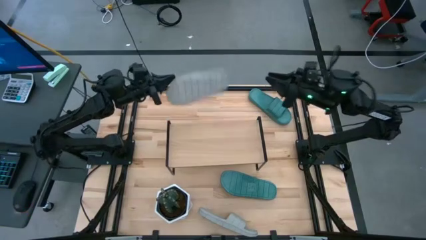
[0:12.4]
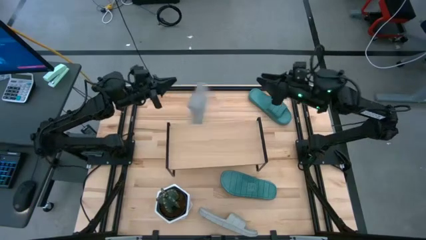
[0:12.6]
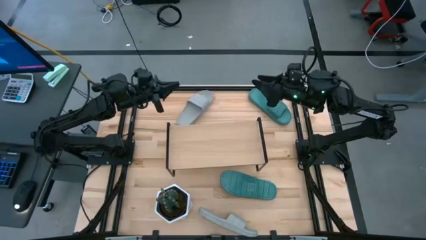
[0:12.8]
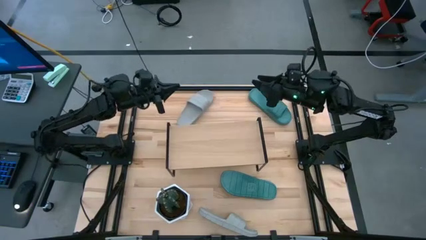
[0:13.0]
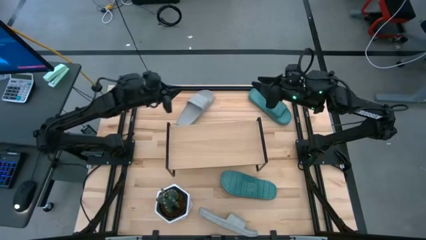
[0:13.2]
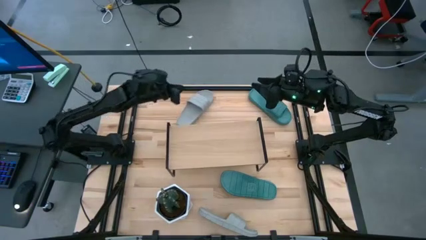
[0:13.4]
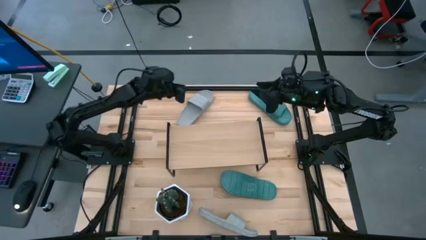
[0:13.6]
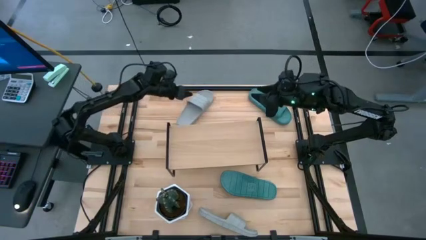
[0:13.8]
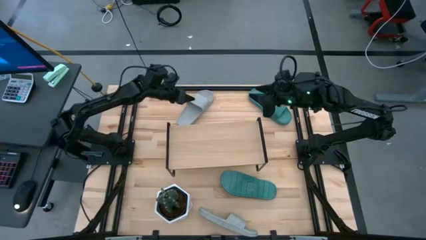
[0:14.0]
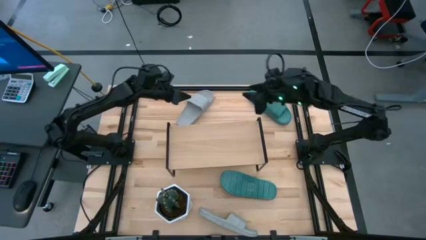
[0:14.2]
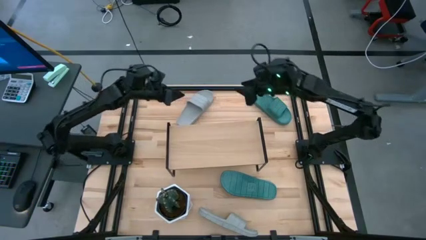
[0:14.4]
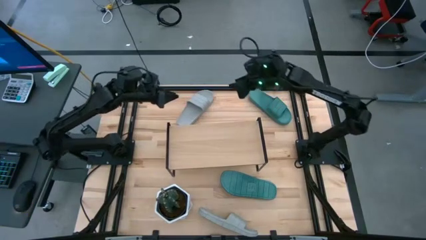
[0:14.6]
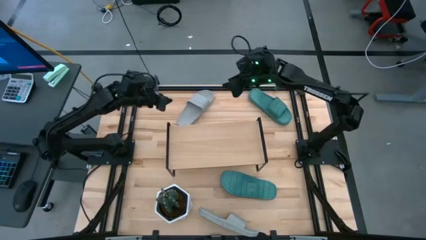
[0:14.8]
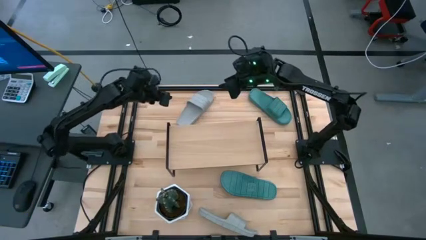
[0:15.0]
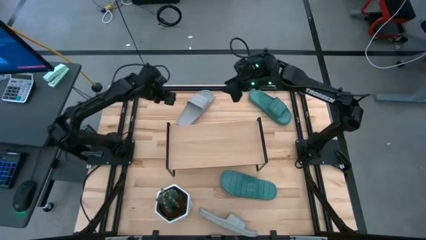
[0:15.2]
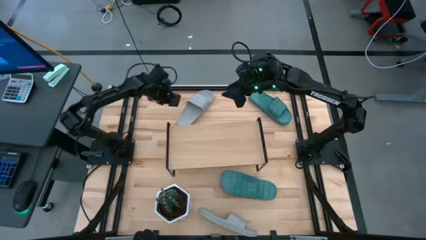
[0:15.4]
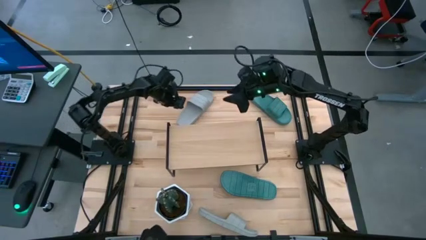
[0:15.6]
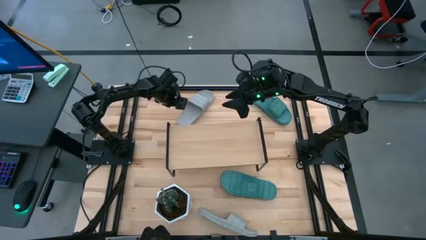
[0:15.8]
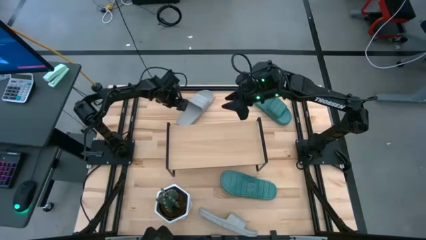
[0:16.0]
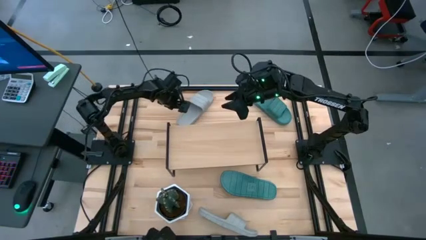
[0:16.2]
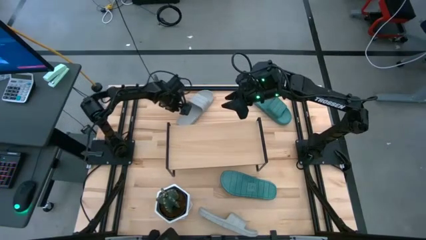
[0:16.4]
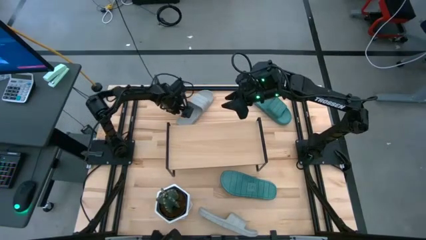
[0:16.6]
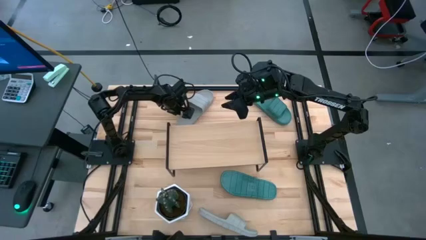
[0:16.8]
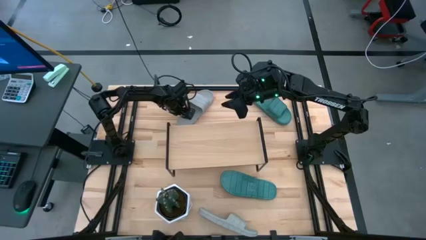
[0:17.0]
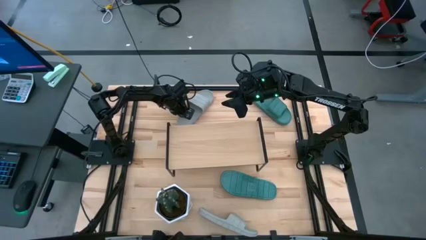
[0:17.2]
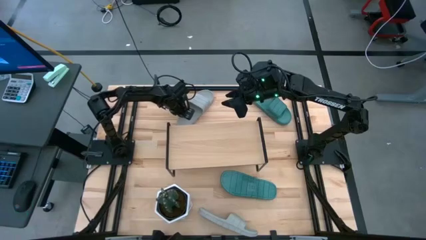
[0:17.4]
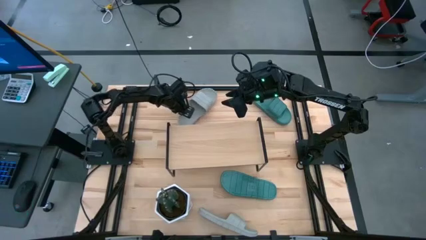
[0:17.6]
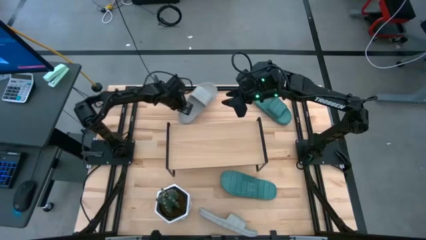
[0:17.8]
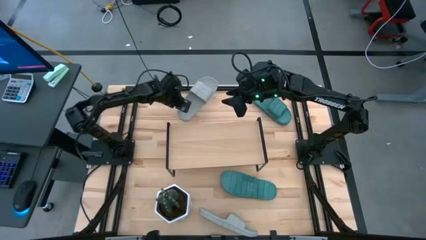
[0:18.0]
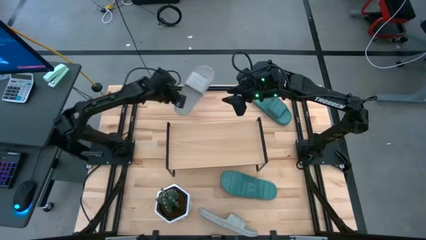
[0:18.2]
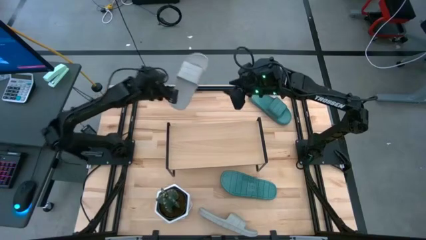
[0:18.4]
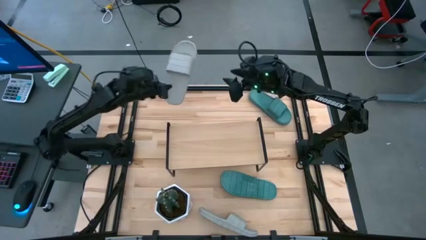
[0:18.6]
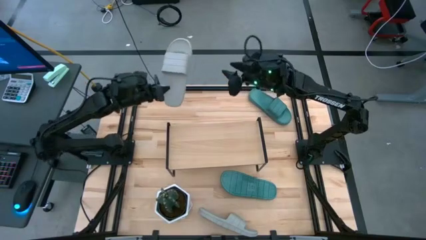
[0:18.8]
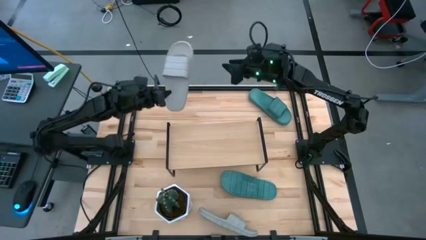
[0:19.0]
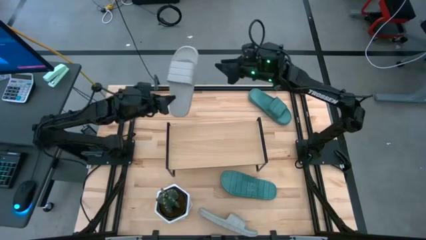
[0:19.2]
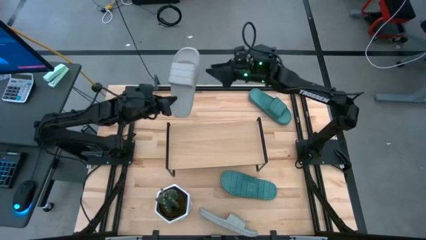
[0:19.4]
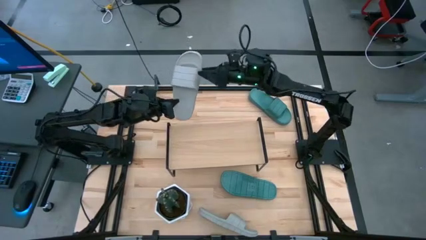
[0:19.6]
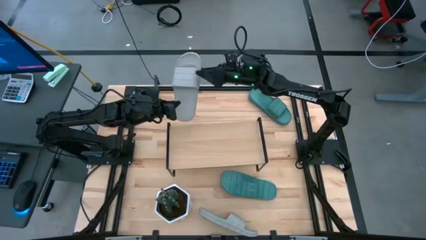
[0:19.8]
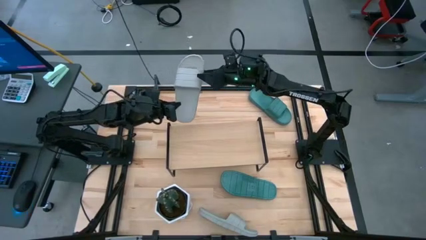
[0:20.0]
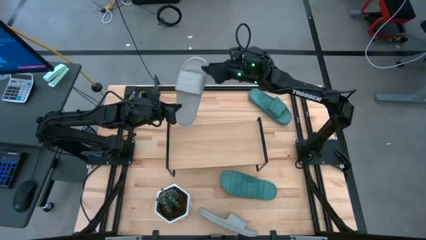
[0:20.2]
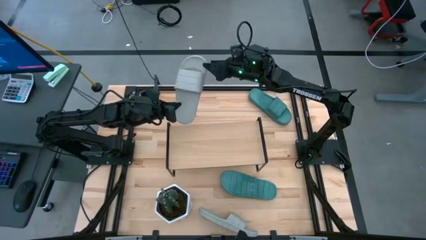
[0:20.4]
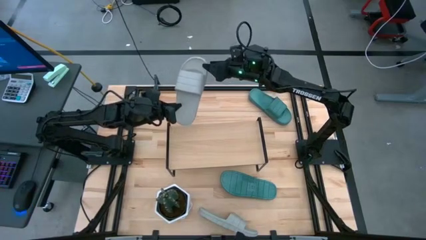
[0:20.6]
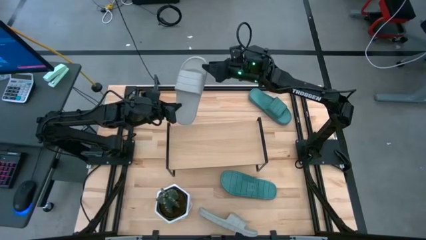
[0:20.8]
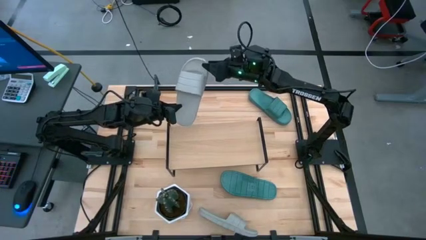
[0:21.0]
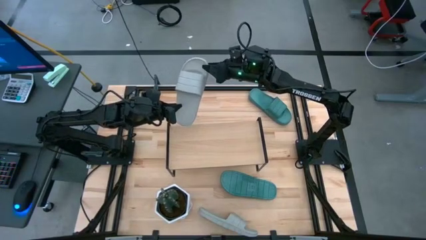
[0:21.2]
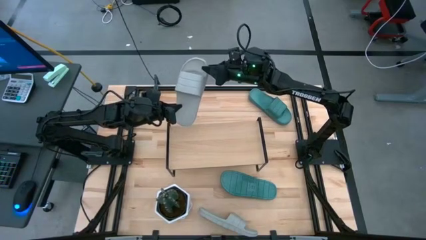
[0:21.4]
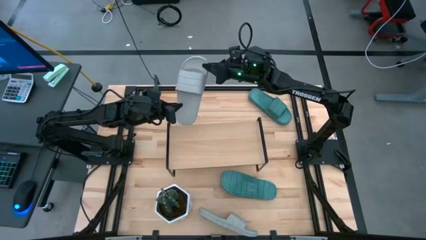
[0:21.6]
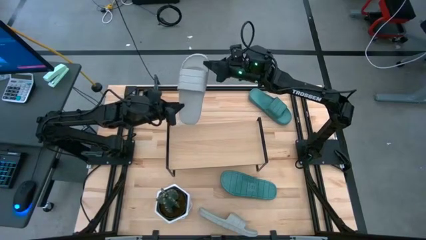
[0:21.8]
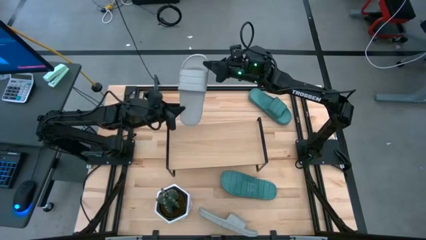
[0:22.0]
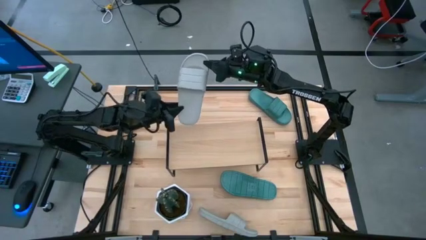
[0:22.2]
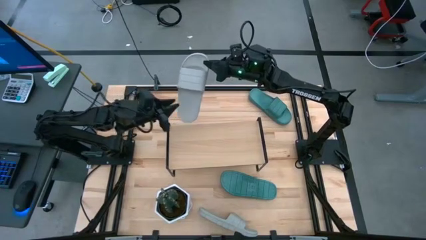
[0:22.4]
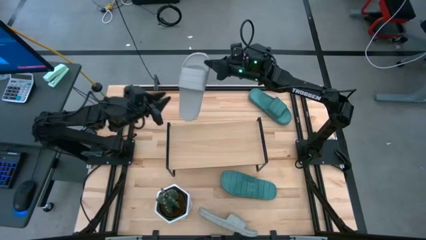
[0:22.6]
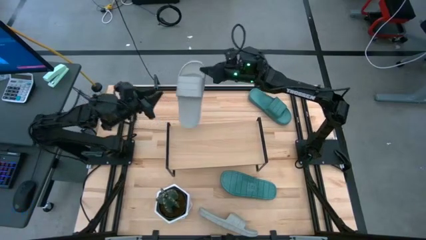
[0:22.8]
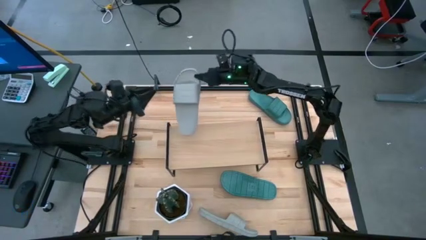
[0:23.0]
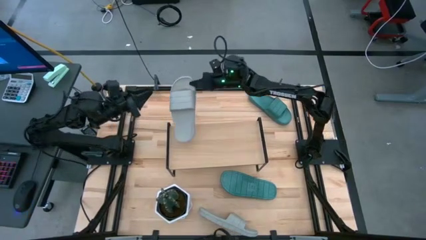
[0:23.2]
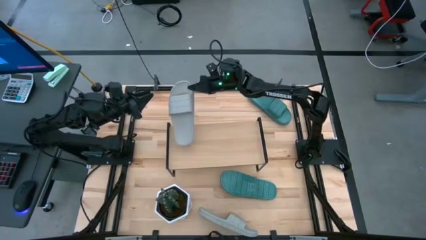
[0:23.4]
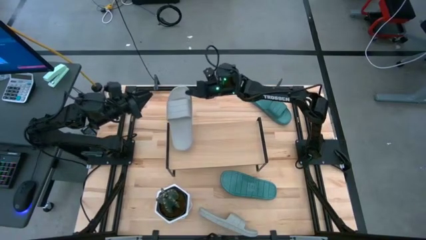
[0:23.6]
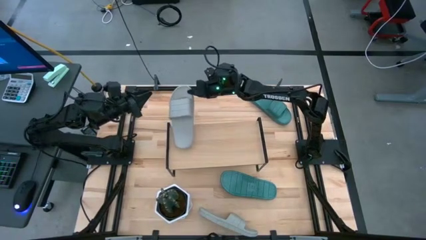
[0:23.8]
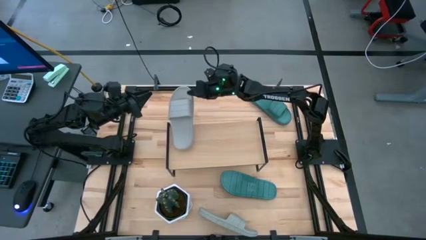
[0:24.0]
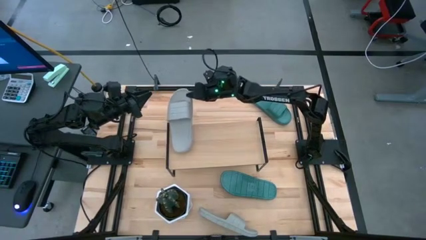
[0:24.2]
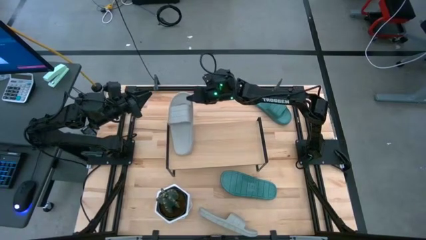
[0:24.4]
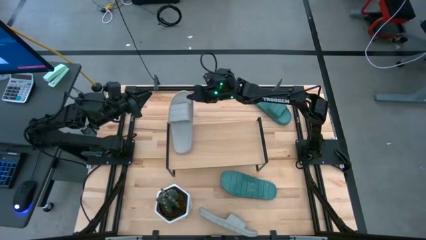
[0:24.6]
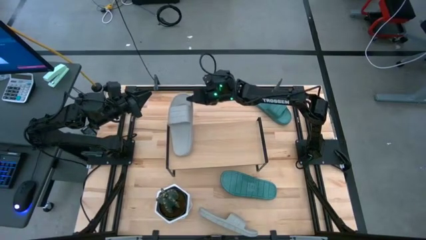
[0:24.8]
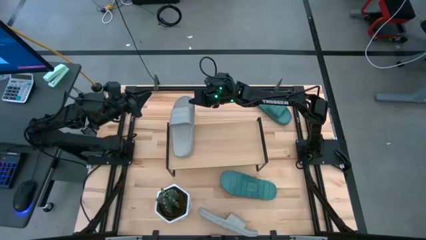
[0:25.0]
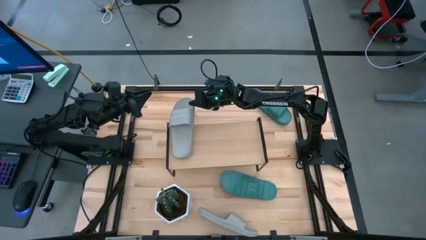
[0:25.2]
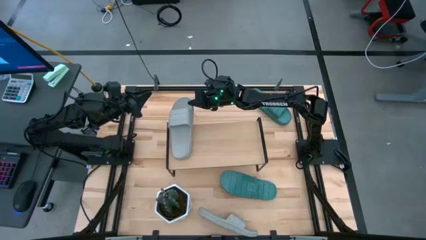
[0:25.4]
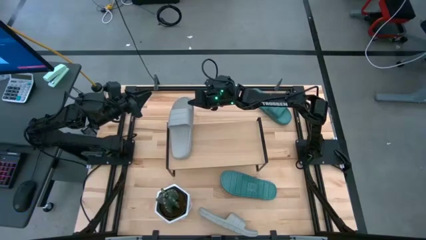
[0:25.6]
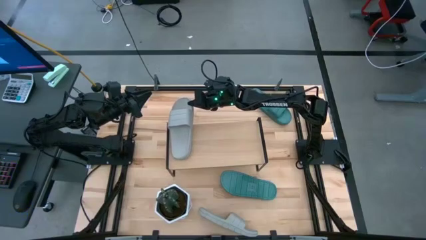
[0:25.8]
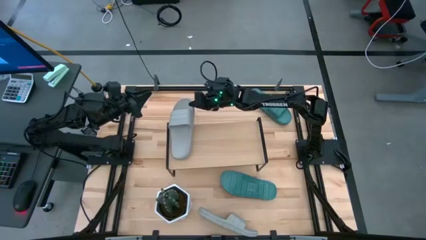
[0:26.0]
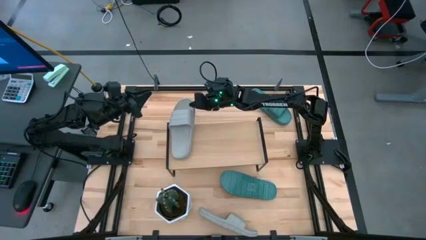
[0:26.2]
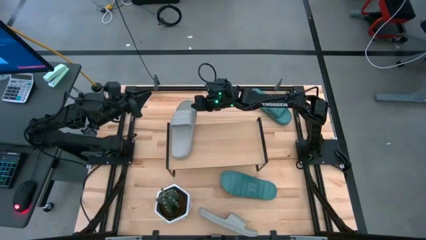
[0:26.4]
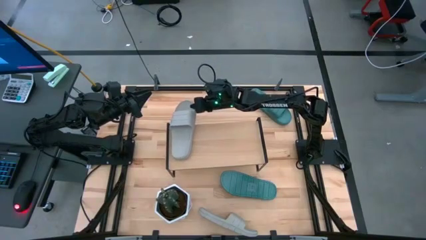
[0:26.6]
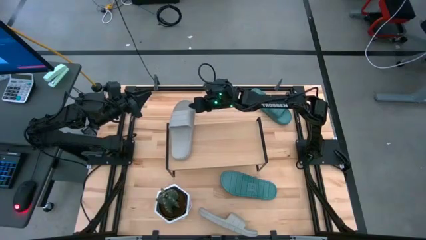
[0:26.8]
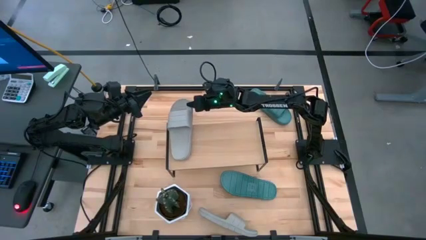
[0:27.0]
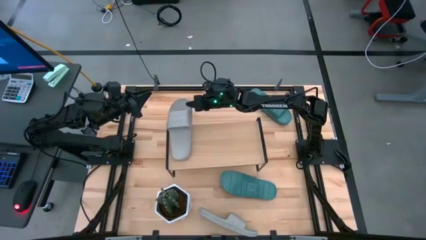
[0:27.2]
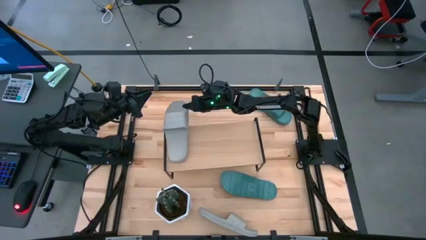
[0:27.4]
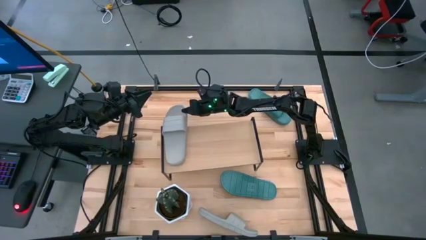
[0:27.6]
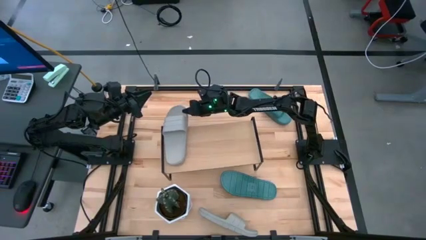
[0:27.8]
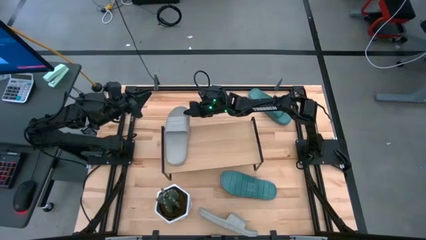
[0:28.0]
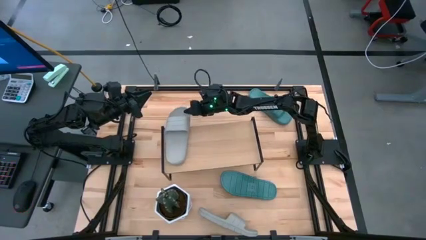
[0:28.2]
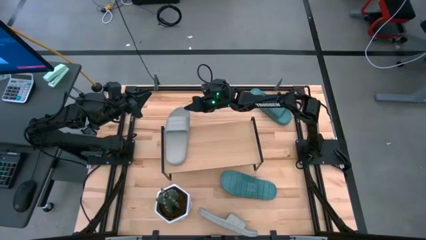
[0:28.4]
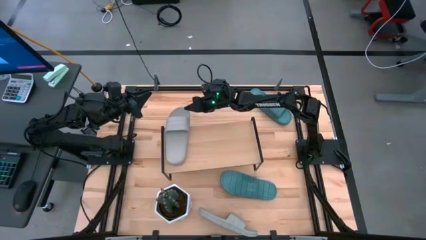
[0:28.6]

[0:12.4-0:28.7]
Task: Pick and place slides into the shelf
Put the top gray slide on the shelf
